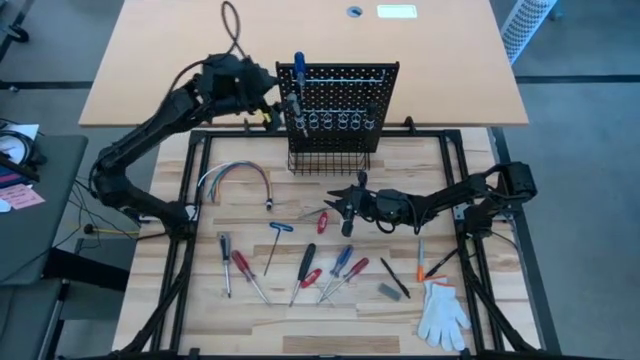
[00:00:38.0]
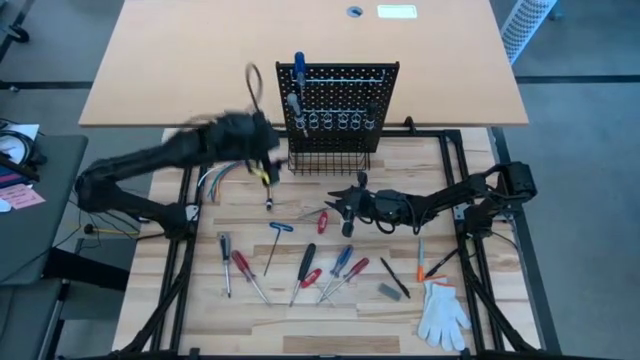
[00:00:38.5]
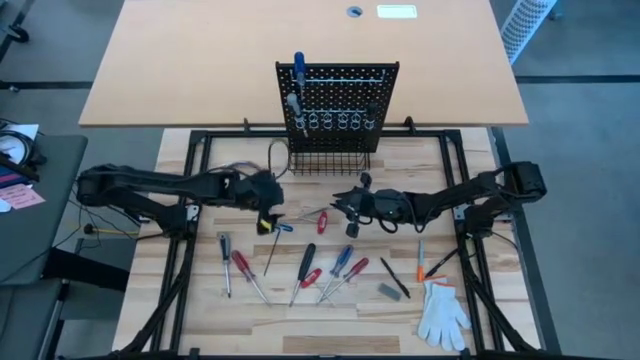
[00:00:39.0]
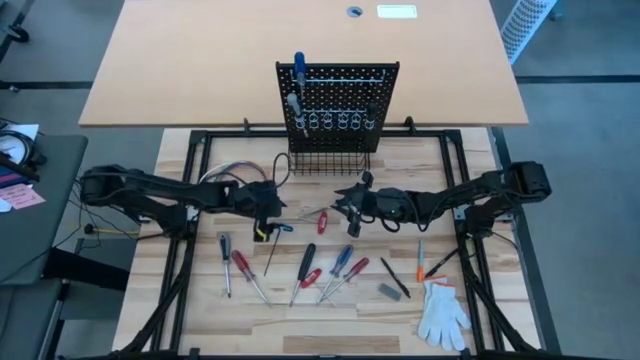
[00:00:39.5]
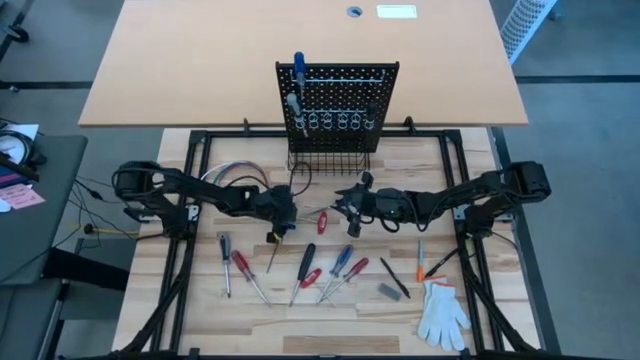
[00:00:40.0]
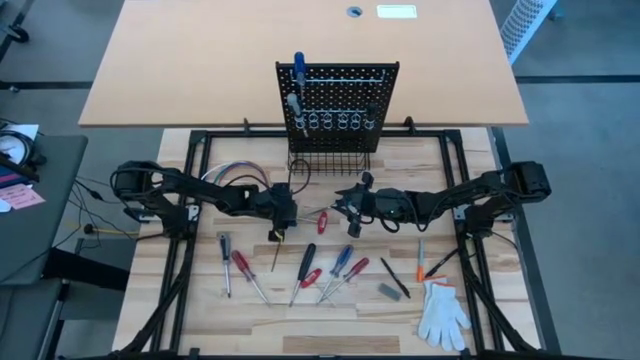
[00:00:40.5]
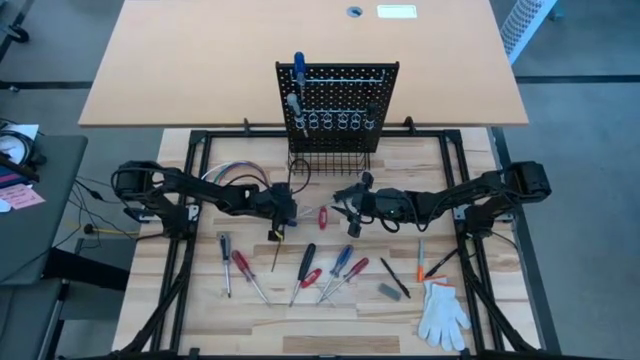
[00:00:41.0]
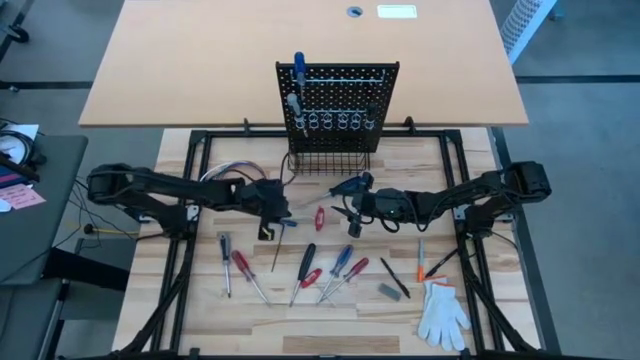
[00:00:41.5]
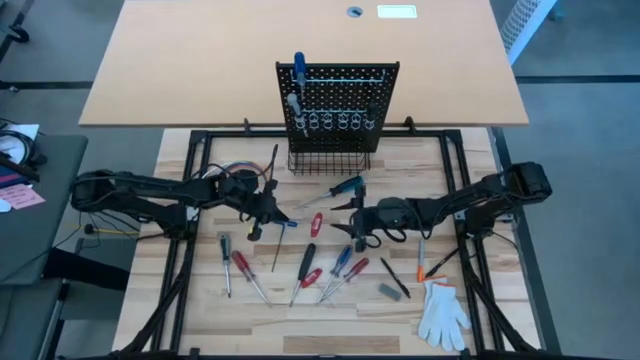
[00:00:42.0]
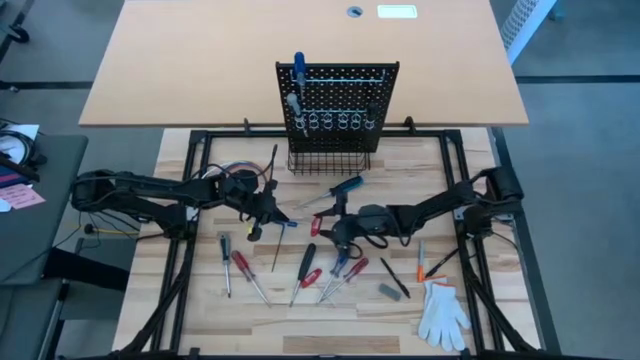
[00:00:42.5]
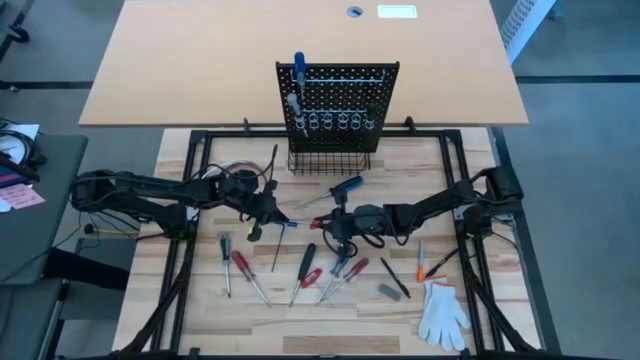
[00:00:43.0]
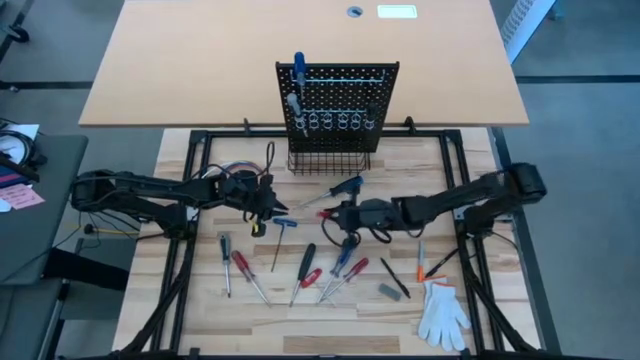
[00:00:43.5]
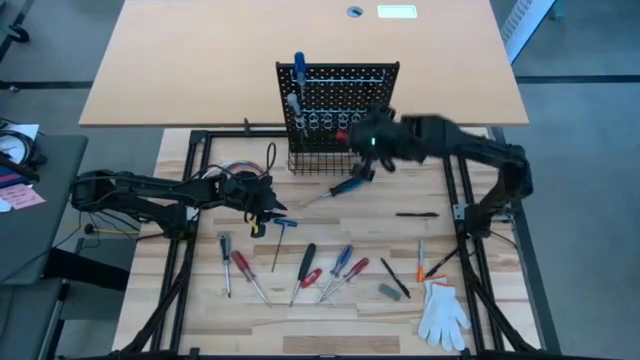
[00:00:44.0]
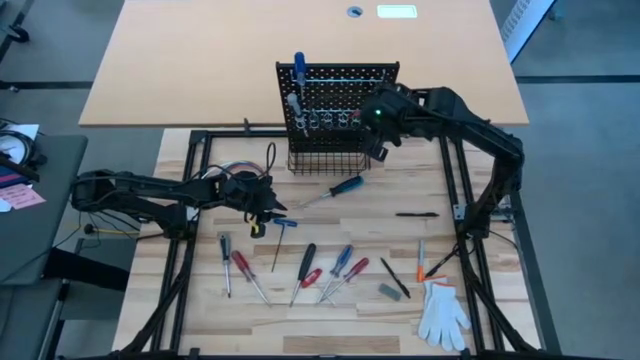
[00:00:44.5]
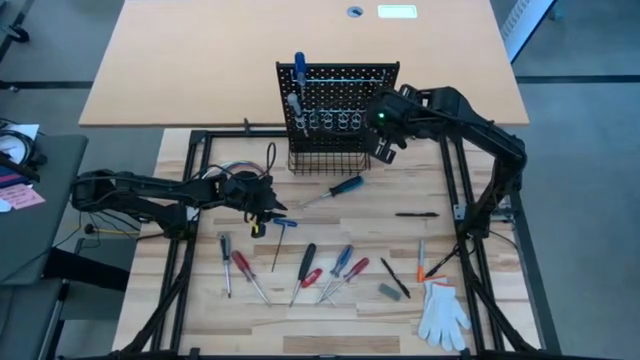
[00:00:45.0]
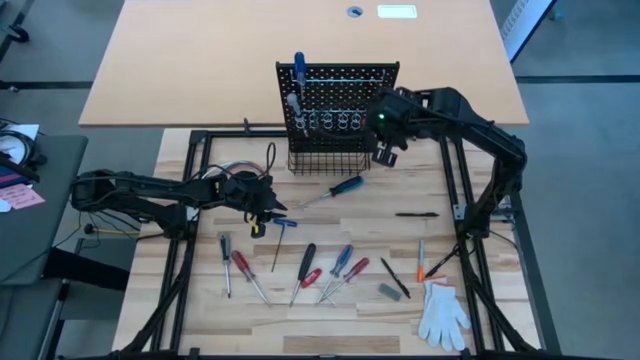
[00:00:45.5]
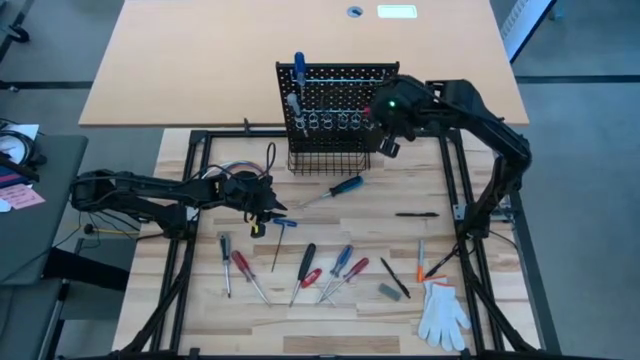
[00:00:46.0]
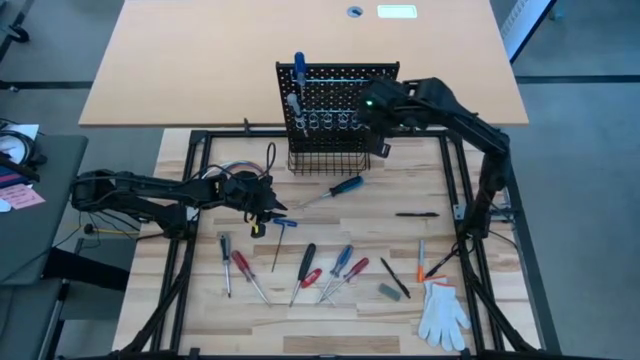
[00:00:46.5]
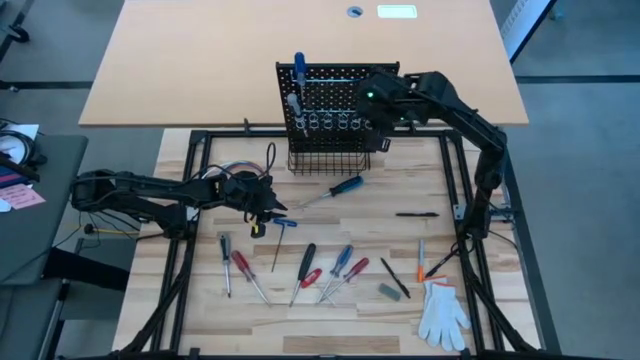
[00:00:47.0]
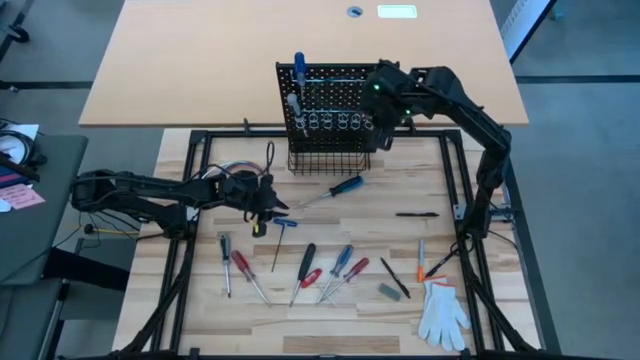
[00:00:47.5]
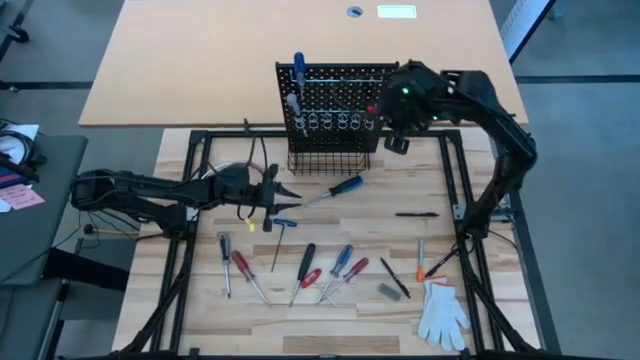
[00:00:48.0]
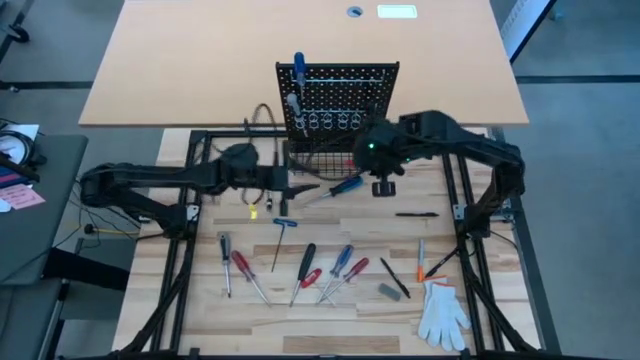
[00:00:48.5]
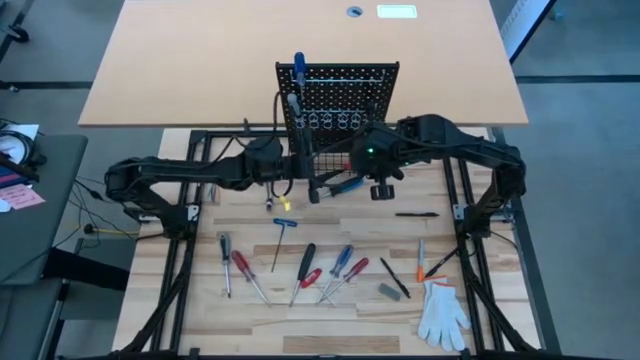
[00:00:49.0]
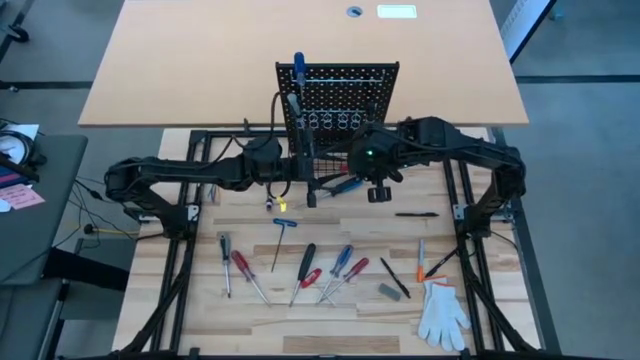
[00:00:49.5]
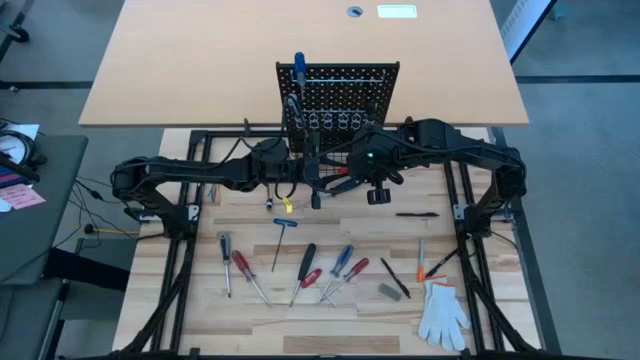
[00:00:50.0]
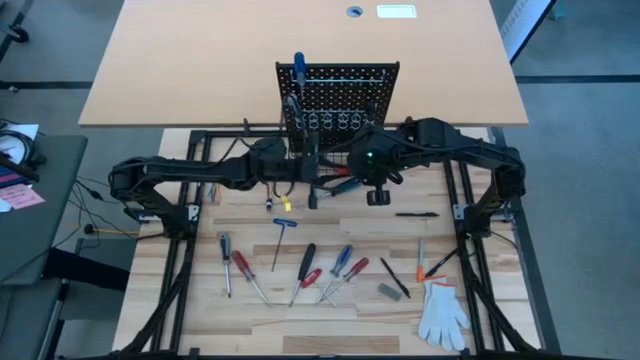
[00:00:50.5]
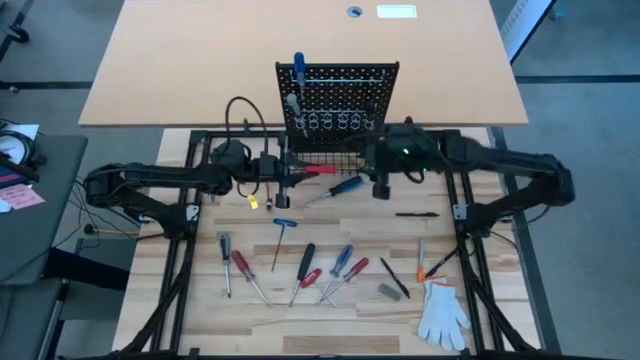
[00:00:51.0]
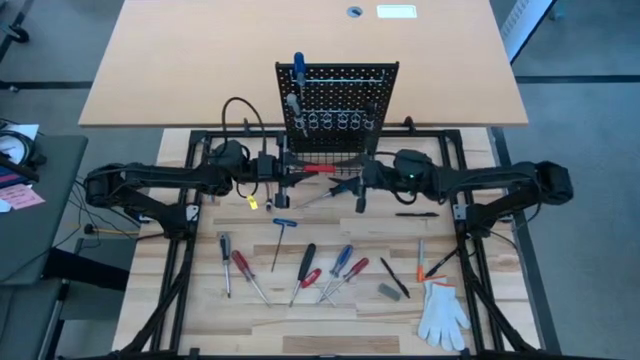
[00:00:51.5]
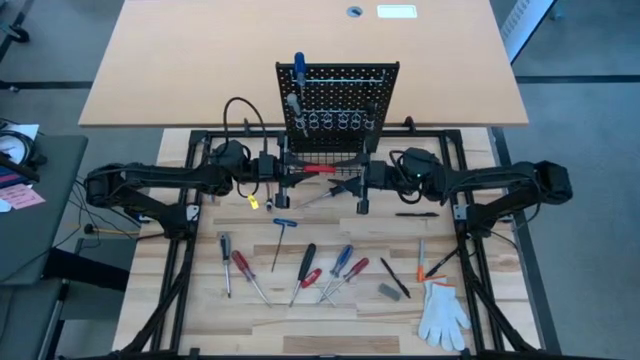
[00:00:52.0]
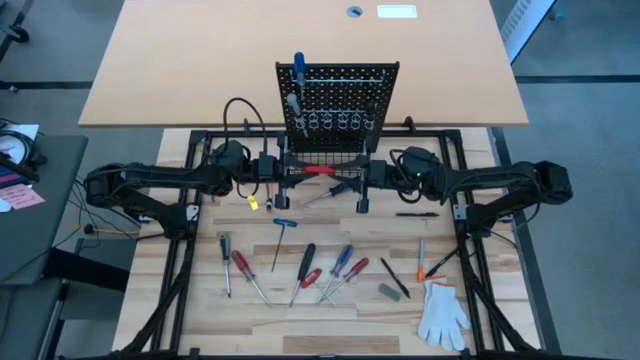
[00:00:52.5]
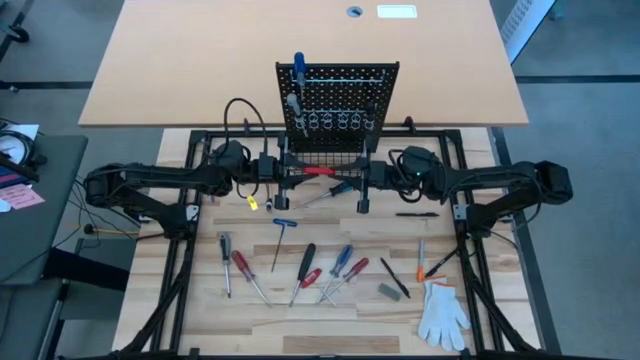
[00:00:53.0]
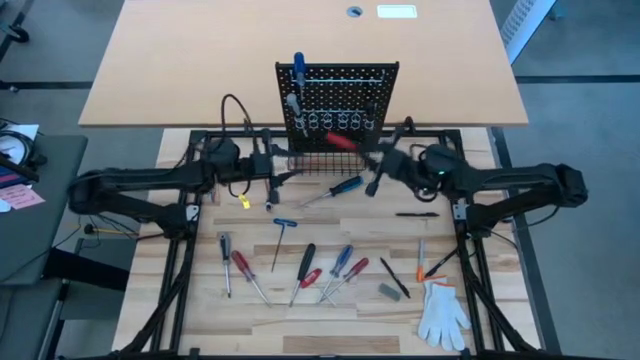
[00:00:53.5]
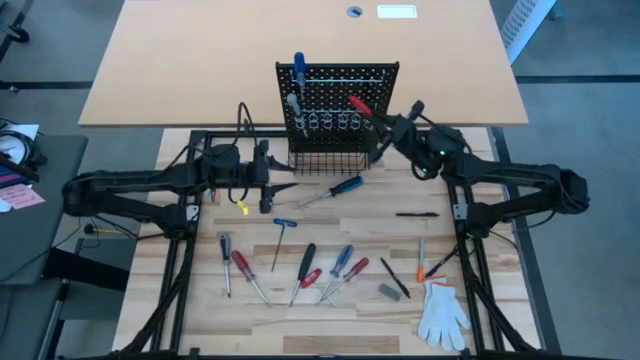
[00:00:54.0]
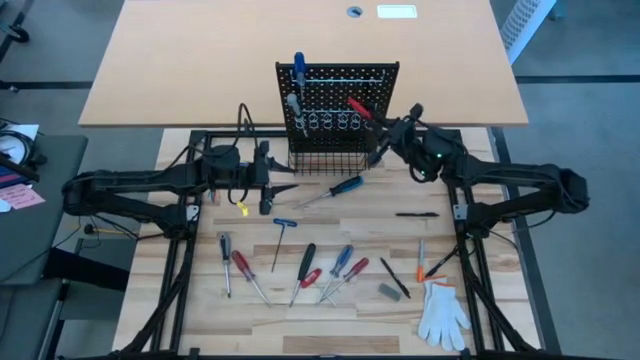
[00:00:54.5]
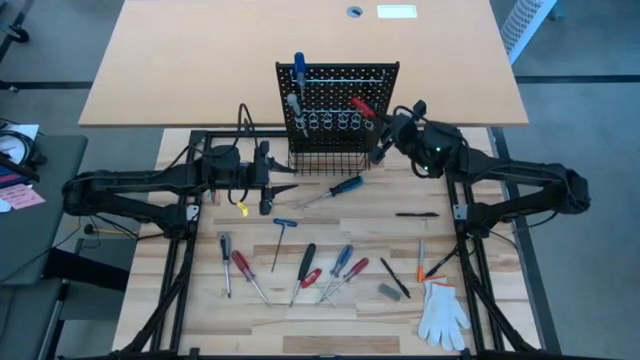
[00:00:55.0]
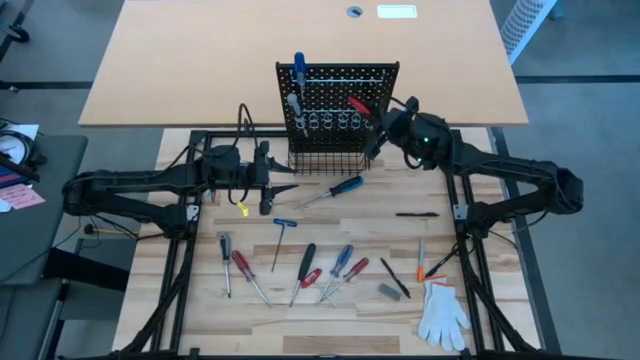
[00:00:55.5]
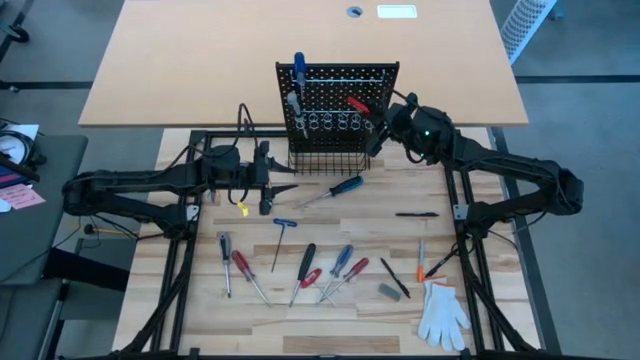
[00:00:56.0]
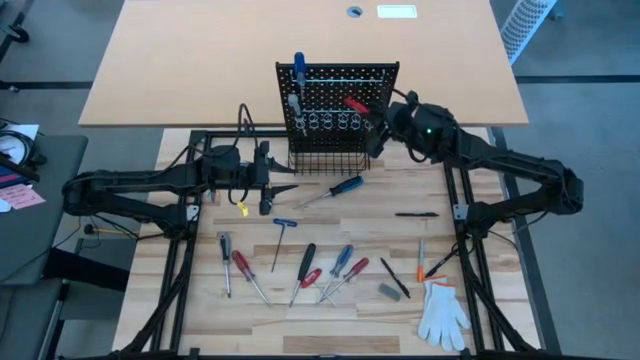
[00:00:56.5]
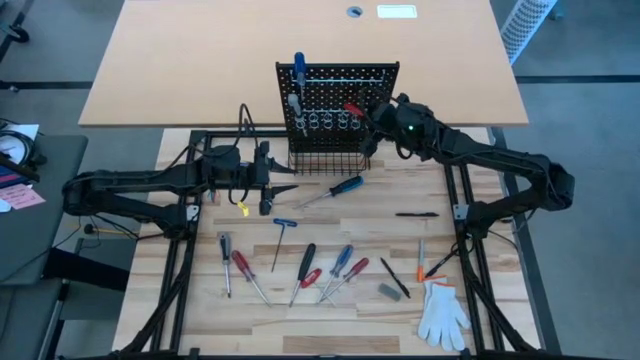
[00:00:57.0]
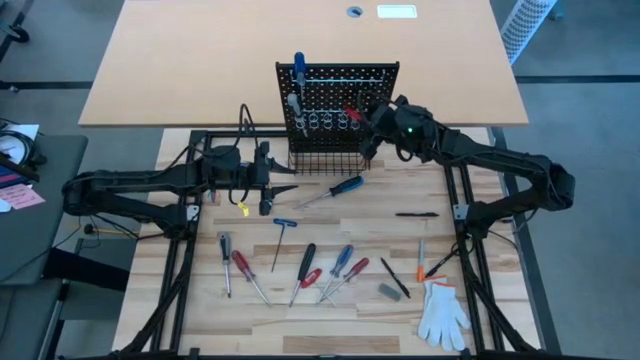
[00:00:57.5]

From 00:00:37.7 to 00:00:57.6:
Task: Hang tools onto peg board
Hang the top red t handle screwdriver on the black peg board

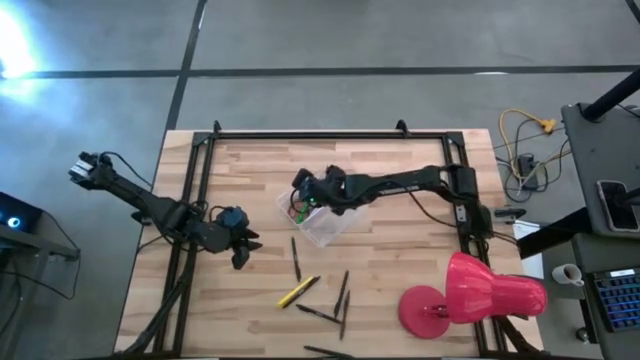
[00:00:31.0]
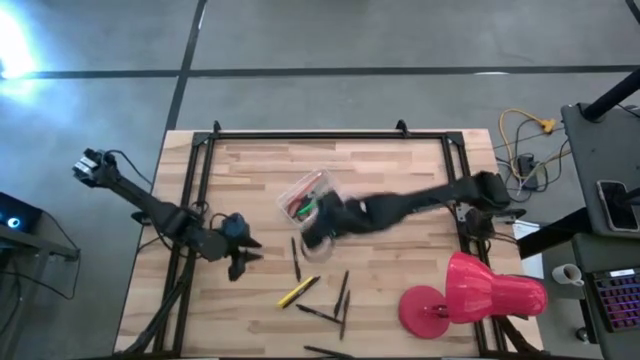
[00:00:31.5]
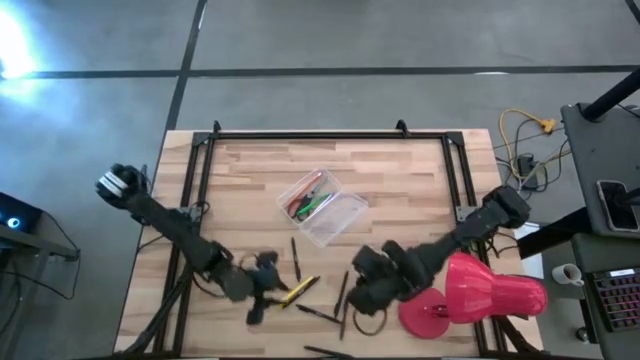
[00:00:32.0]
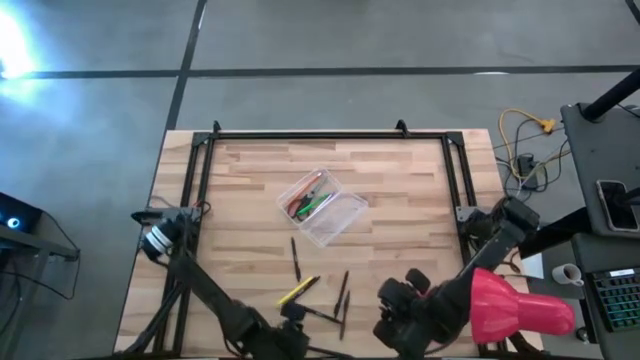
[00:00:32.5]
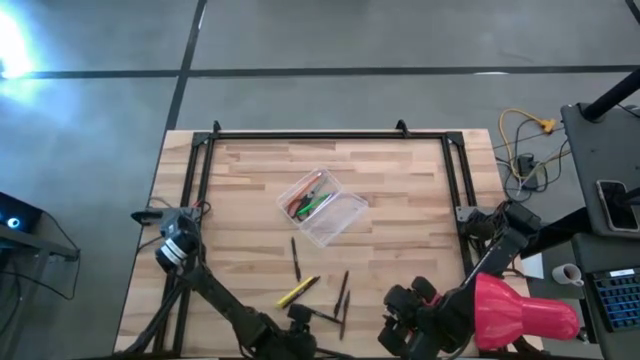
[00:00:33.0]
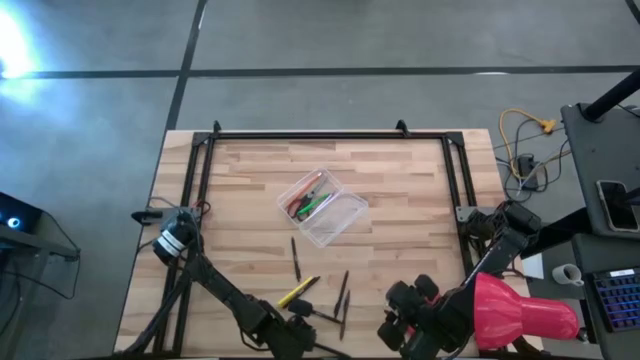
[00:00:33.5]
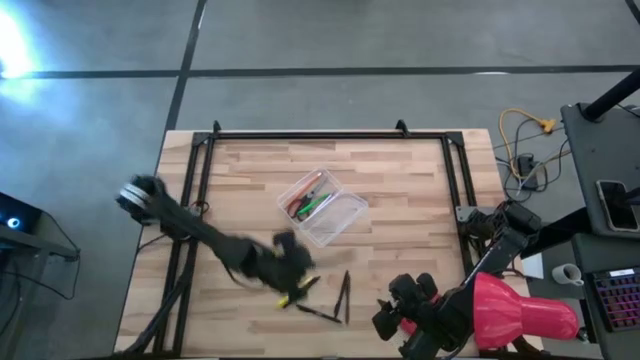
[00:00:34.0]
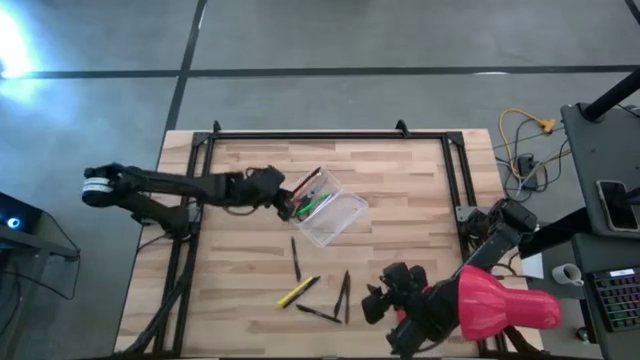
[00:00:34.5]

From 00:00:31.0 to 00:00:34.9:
Task: Pick & place school supplies into a supply box
Put the black pen into the transparent supply box
